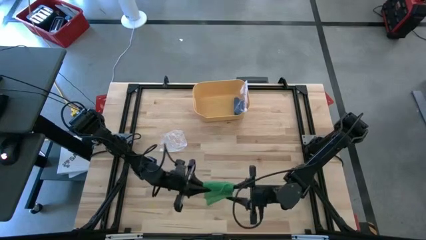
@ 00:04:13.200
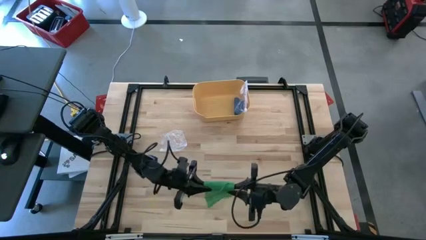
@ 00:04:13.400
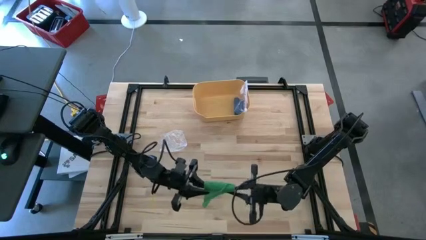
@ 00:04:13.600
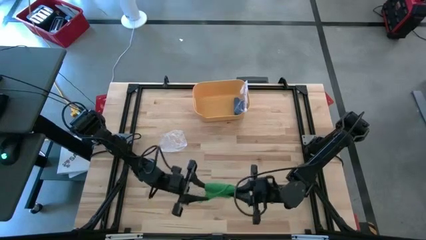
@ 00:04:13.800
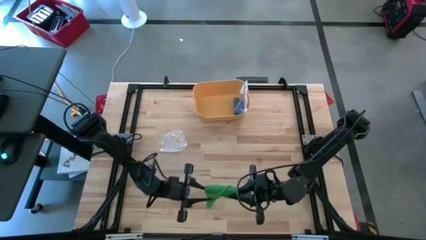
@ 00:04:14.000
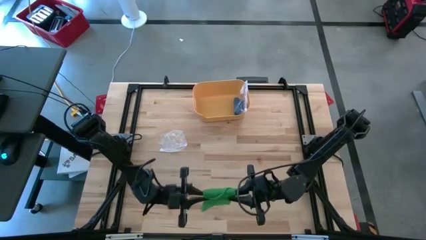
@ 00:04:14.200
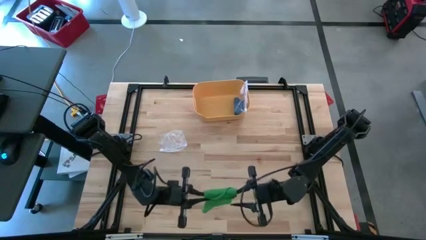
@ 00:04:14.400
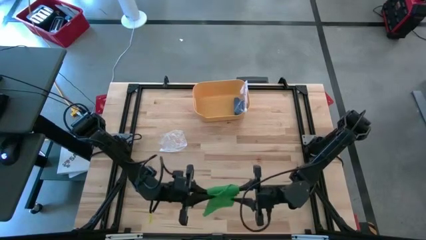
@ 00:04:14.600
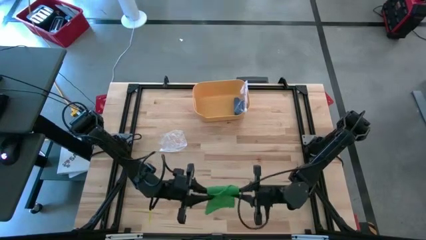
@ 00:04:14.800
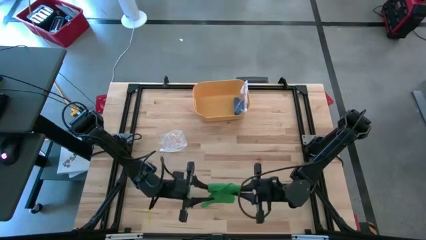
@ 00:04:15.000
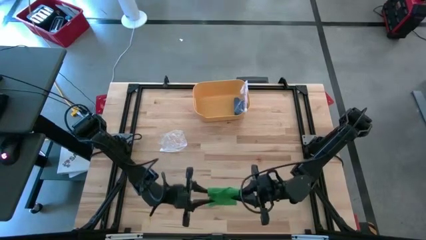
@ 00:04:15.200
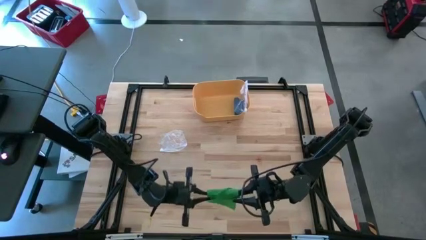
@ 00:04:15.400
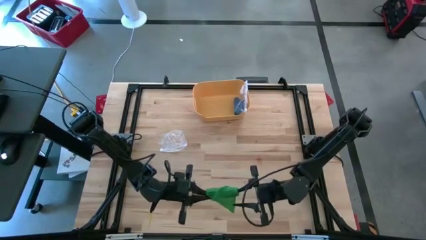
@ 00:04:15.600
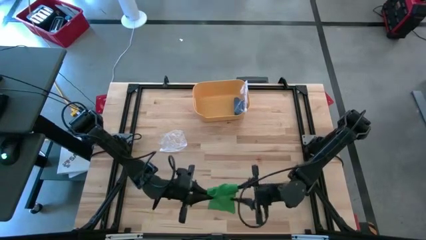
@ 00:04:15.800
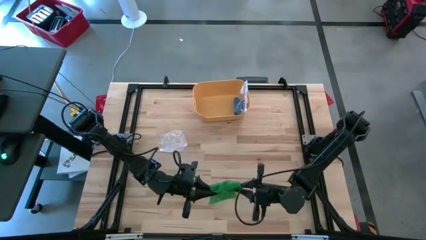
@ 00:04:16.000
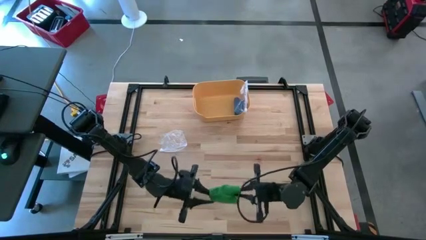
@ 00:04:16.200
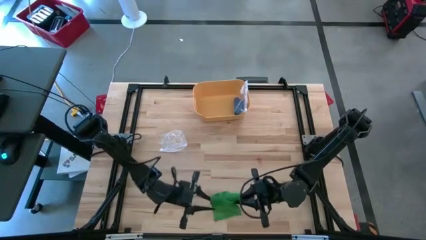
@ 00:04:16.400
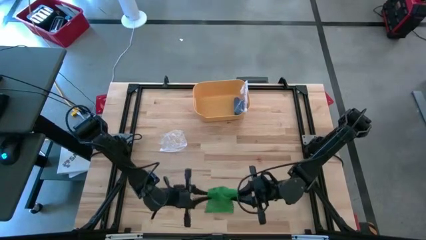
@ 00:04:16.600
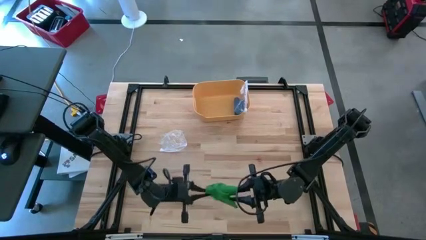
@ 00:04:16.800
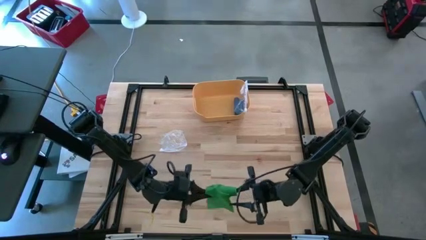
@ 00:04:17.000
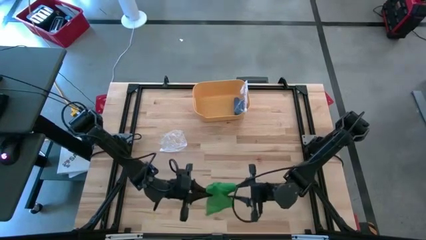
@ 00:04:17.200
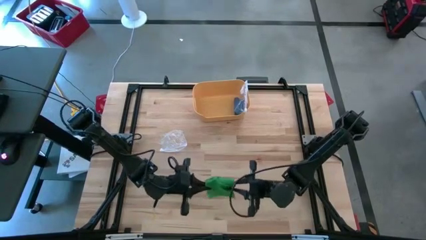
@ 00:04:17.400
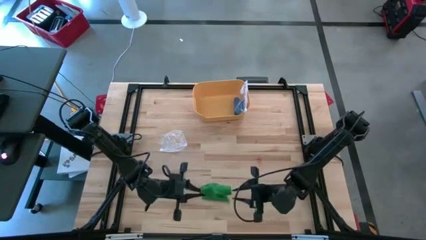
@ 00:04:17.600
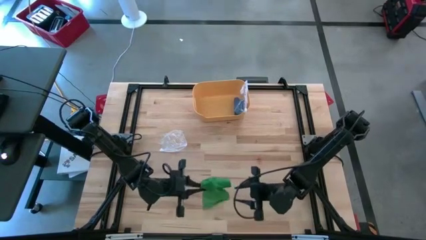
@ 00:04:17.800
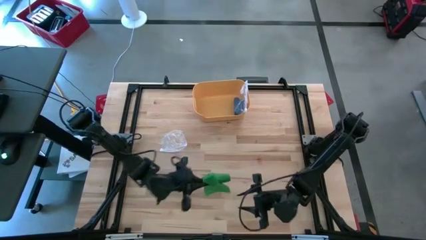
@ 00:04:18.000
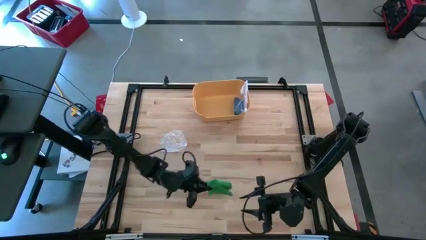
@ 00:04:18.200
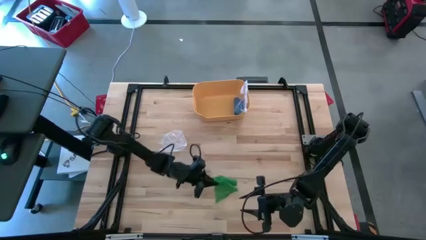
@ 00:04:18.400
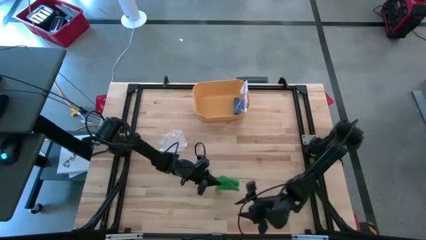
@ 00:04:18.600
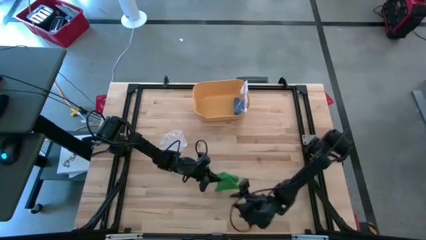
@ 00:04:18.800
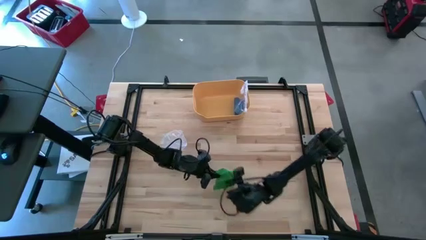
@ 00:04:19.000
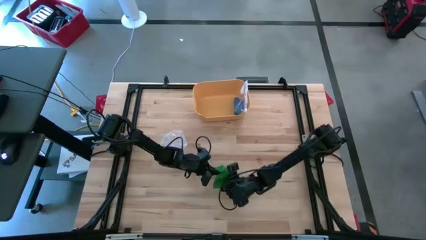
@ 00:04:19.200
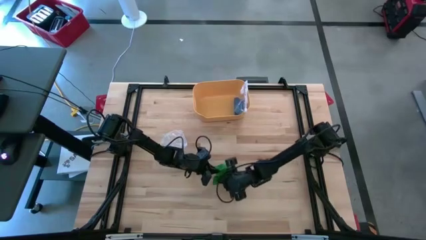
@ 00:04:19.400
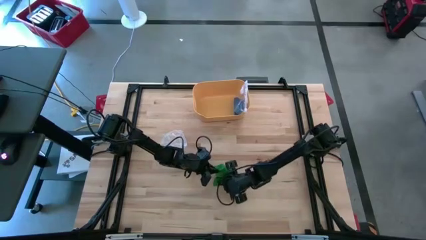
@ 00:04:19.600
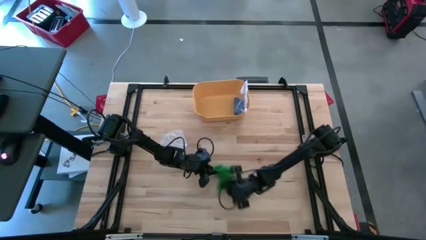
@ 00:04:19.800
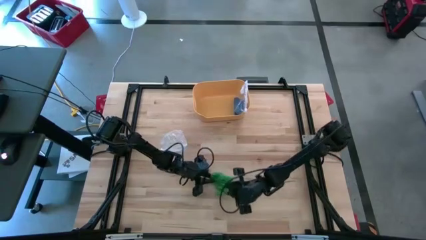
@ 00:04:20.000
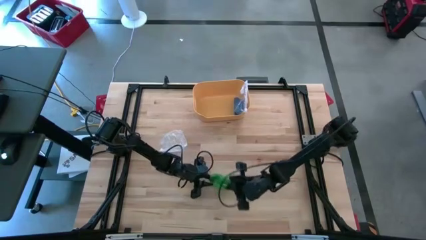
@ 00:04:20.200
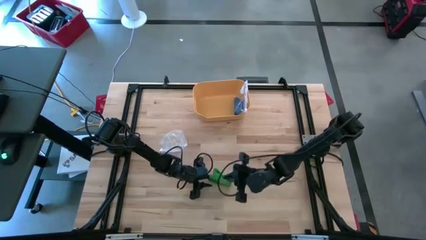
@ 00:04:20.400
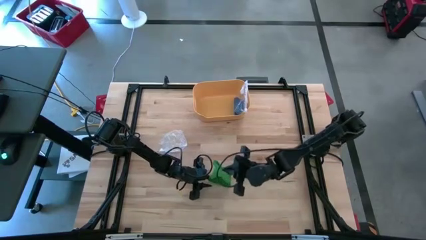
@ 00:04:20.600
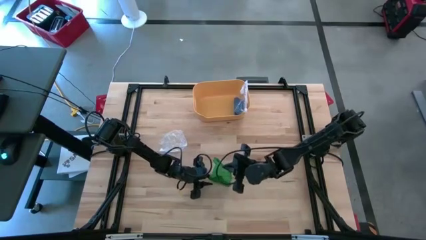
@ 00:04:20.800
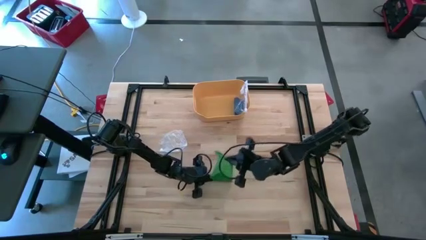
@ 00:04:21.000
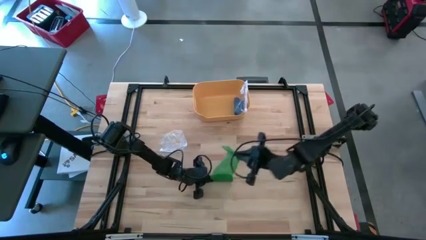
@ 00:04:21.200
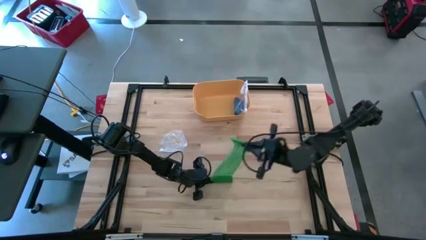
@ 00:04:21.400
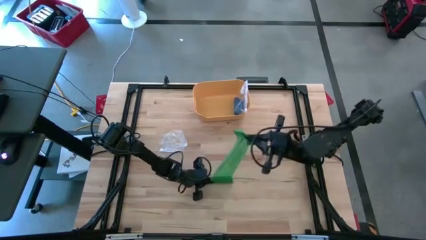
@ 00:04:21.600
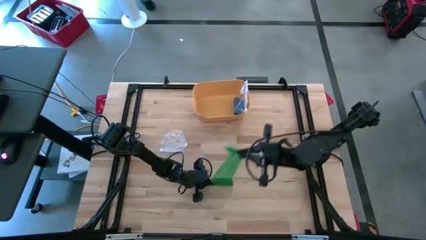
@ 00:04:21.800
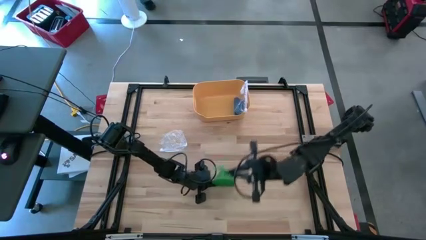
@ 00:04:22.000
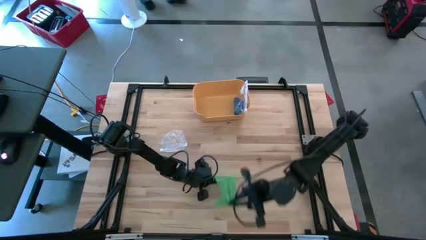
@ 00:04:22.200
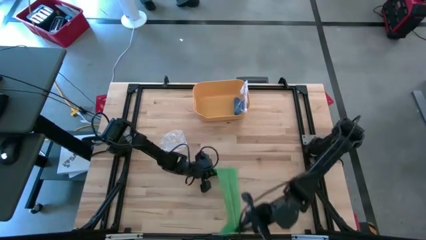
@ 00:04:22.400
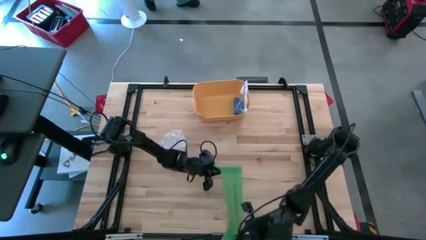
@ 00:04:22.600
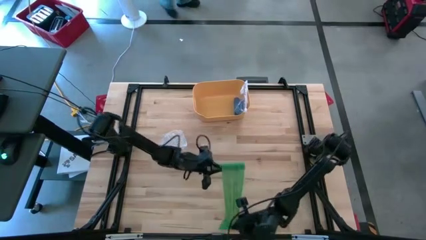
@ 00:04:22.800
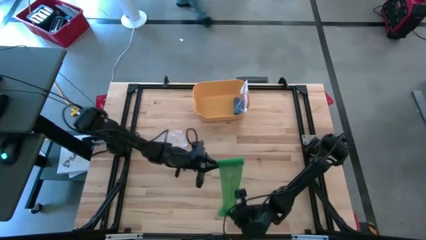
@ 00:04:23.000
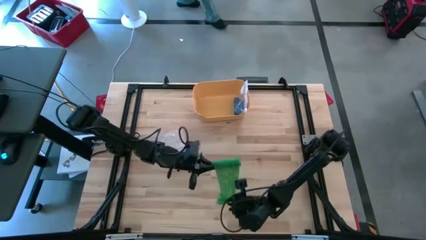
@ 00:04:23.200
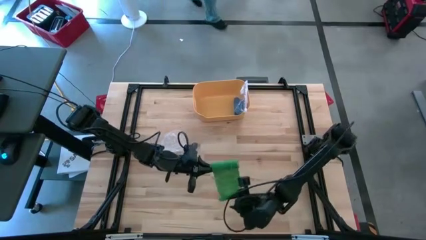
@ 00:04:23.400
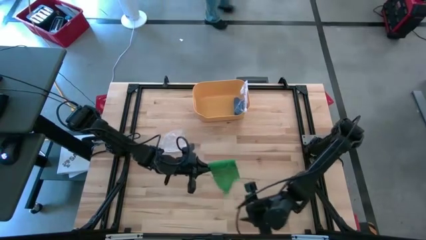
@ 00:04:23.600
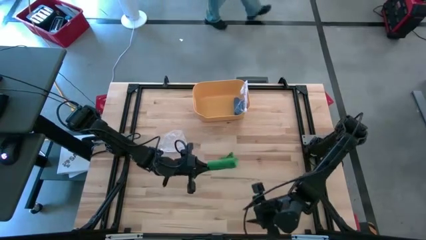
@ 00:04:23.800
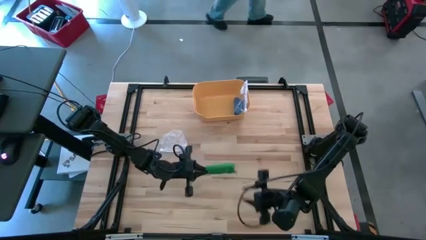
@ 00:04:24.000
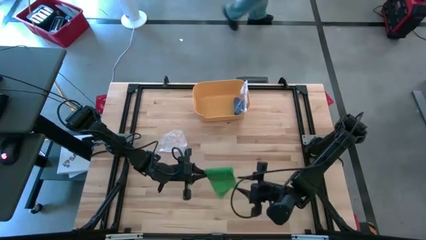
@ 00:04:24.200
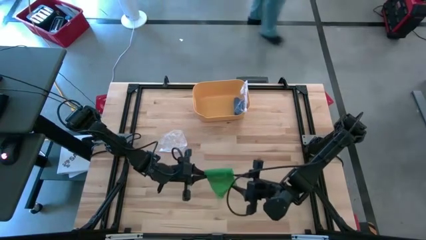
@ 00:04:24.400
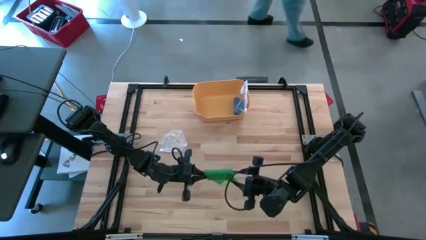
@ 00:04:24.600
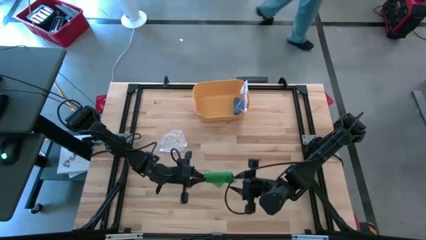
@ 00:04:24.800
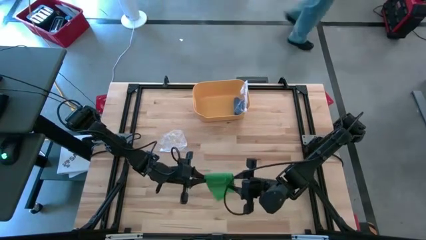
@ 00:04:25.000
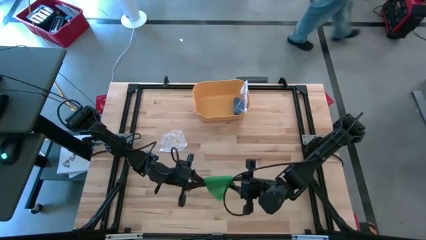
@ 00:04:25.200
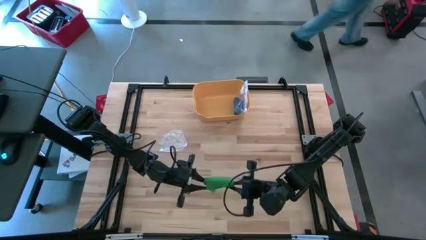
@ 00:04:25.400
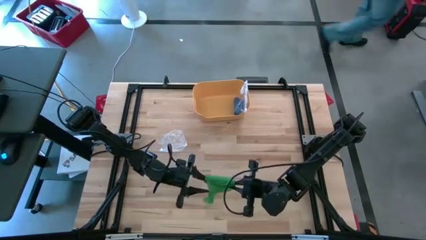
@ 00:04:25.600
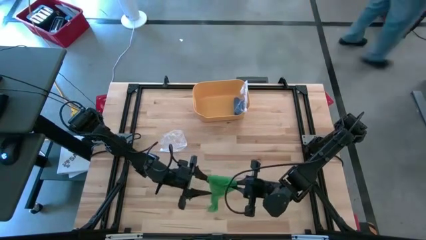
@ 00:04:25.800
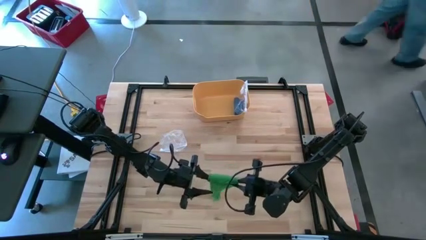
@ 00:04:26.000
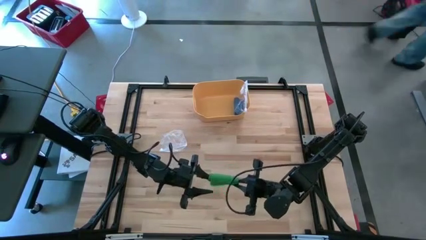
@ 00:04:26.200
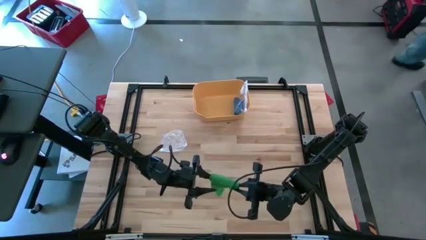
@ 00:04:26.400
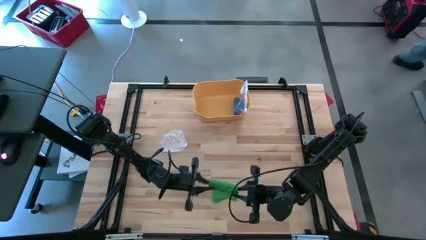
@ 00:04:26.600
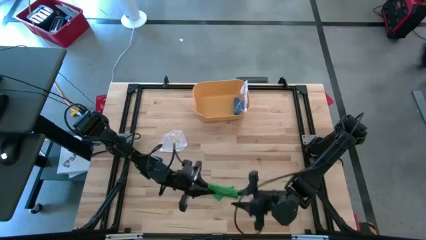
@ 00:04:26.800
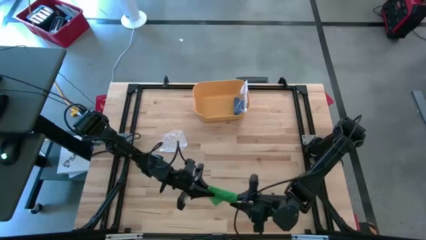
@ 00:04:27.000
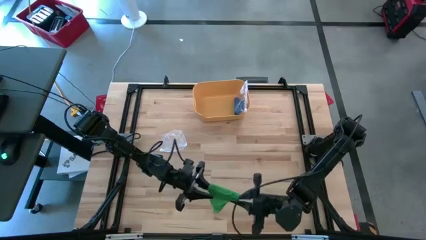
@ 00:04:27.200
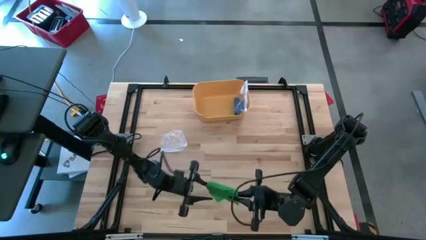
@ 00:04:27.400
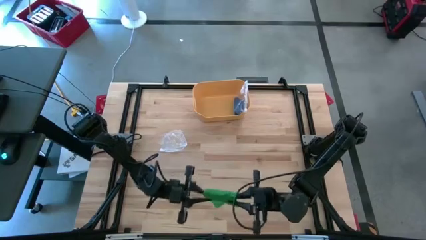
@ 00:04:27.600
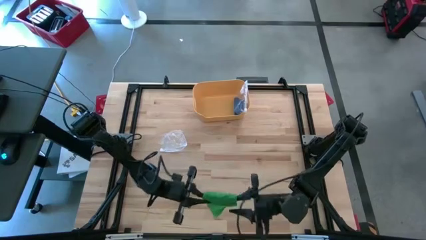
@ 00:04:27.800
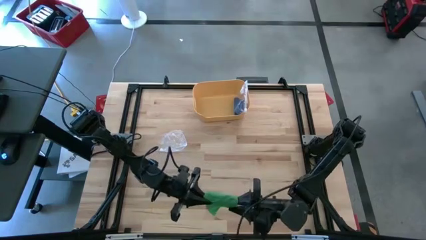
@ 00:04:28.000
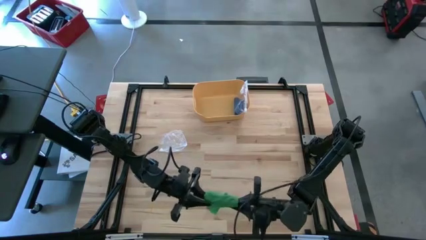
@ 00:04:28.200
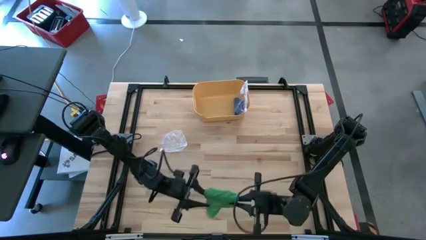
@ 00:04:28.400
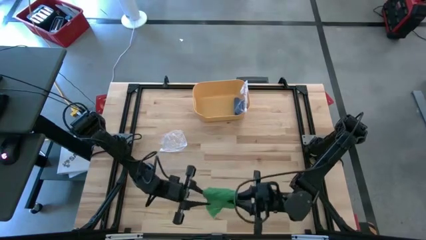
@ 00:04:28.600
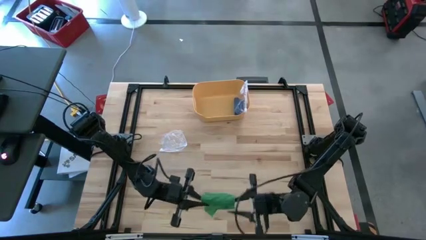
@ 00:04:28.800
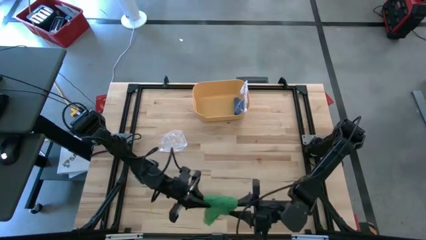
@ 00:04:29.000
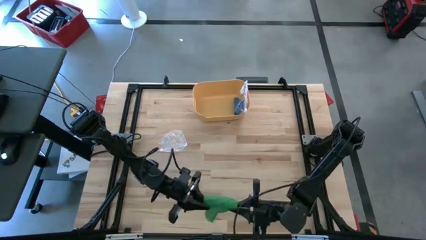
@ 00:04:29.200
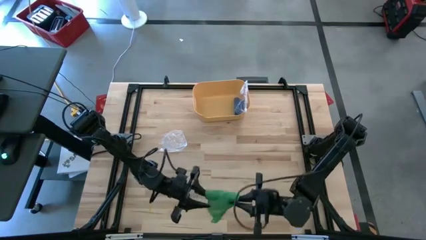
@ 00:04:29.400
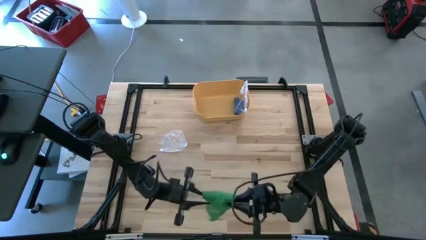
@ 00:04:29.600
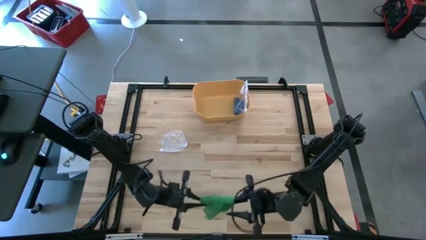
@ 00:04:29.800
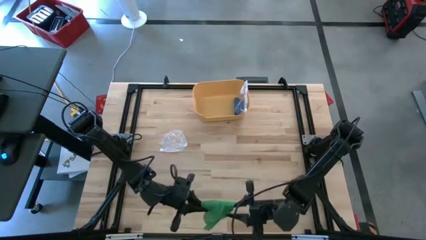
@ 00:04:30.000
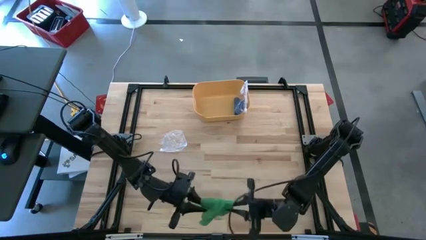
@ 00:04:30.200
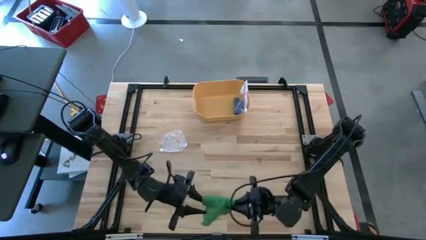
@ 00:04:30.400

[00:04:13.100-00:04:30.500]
Task: Roll bandage
Roll the green bandage
